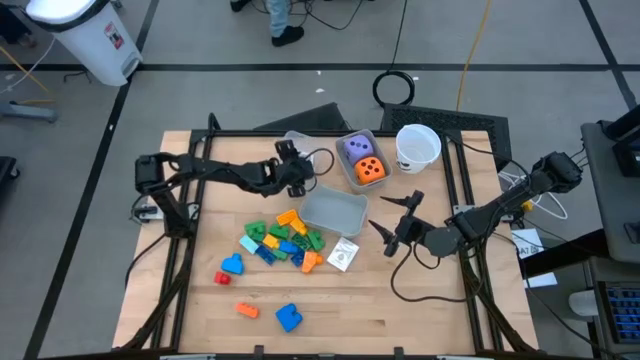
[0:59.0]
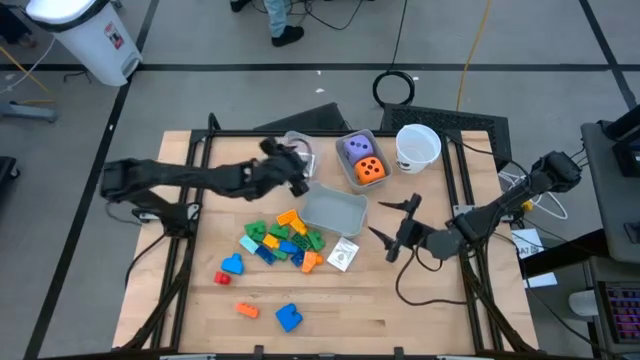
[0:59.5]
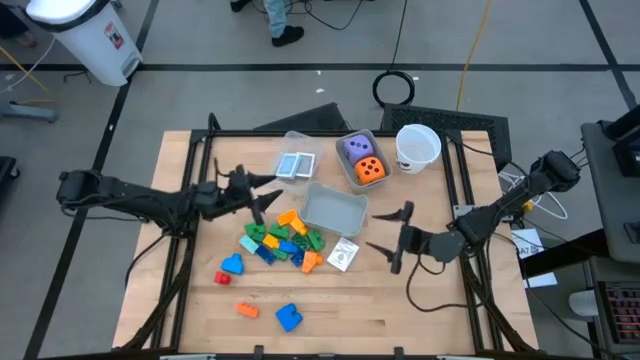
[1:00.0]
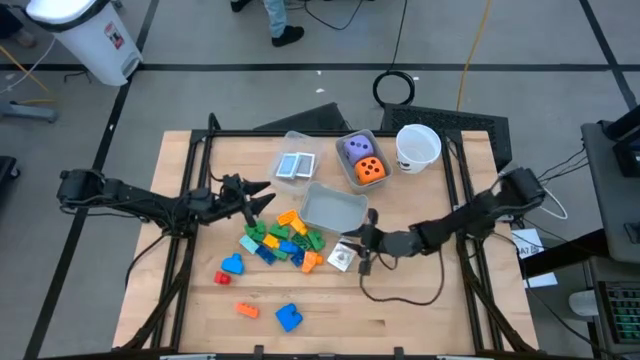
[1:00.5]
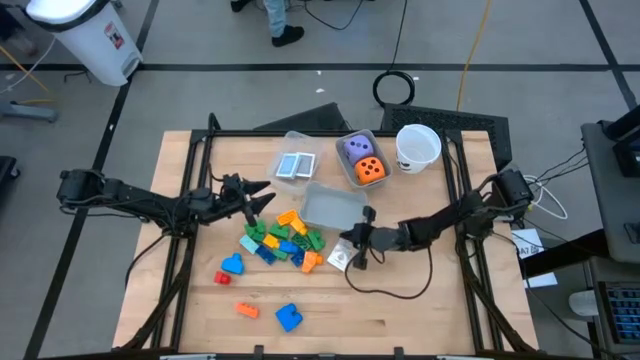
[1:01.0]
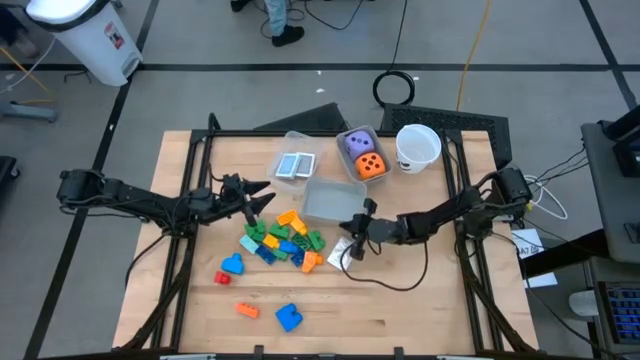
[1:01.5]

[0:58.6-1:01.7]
Task: Pick & Place Toys
Adjust the bottom gray bin on the table

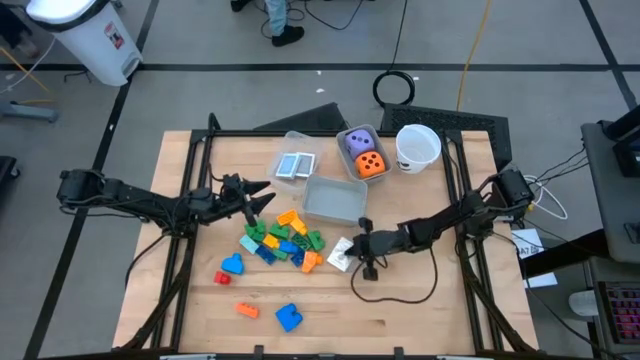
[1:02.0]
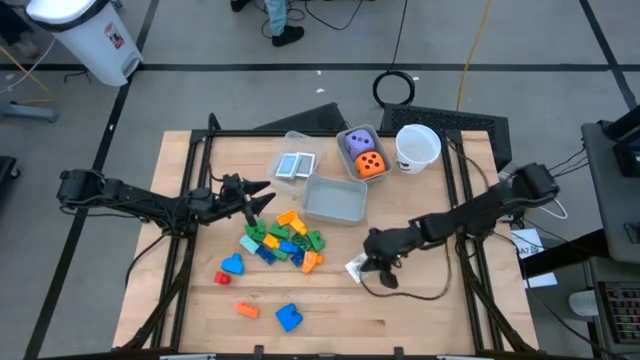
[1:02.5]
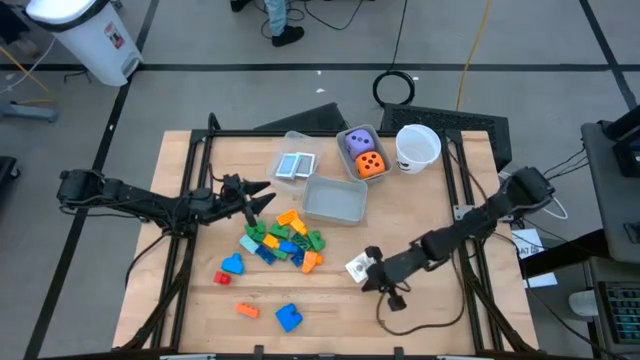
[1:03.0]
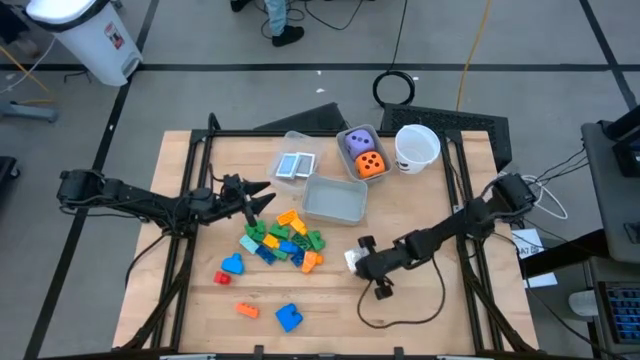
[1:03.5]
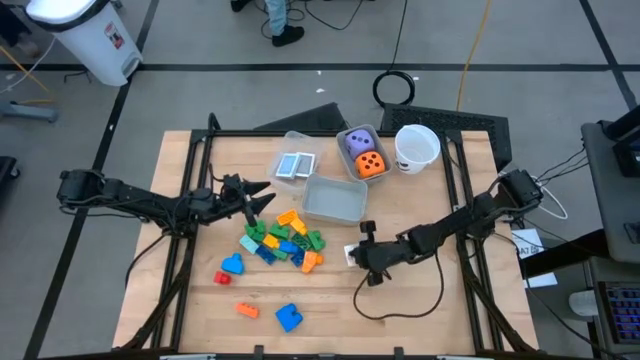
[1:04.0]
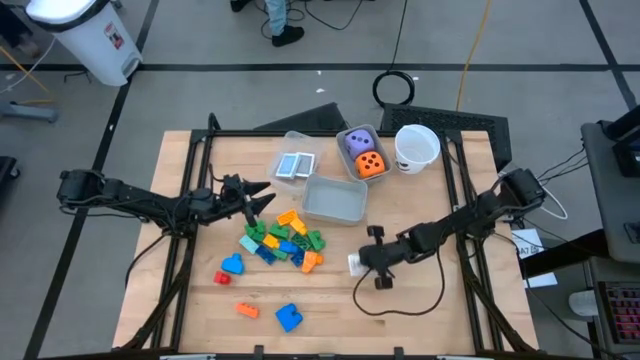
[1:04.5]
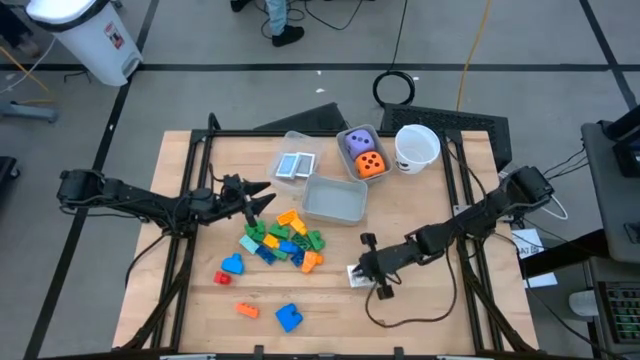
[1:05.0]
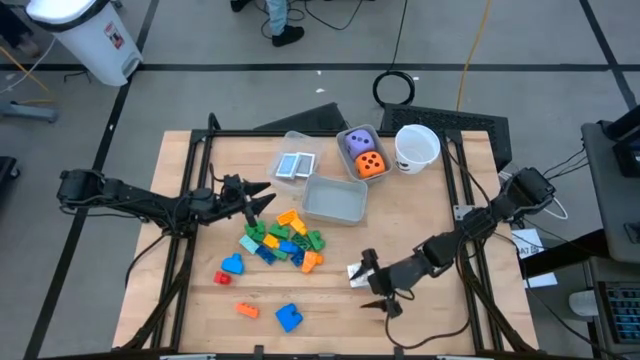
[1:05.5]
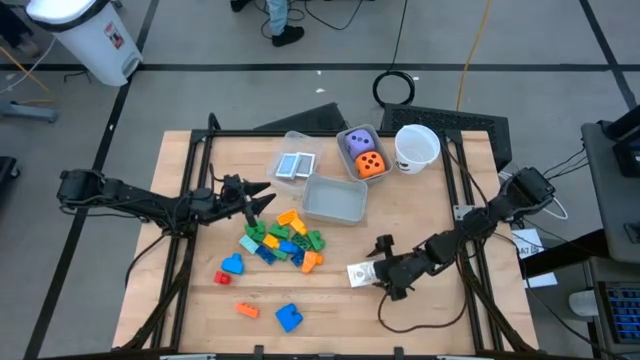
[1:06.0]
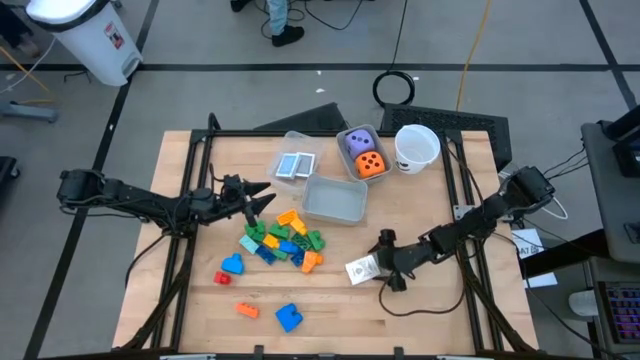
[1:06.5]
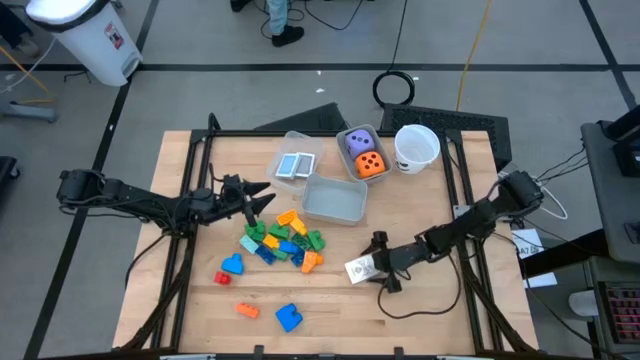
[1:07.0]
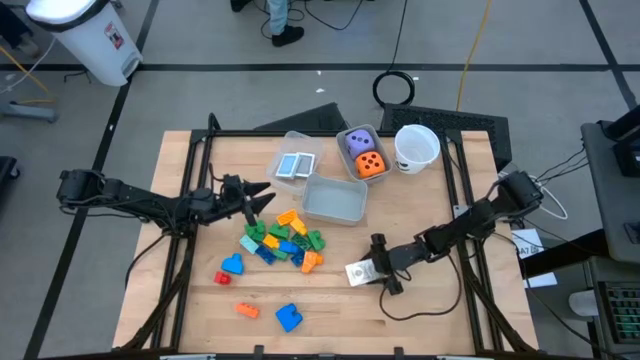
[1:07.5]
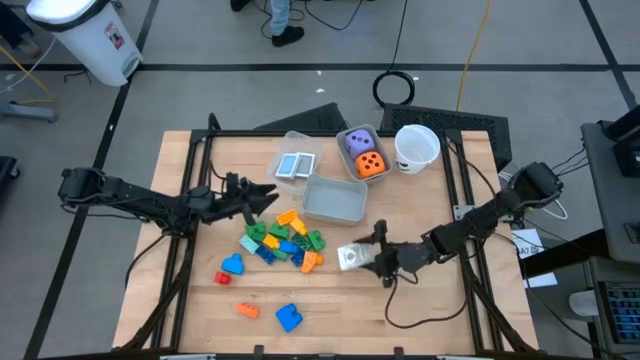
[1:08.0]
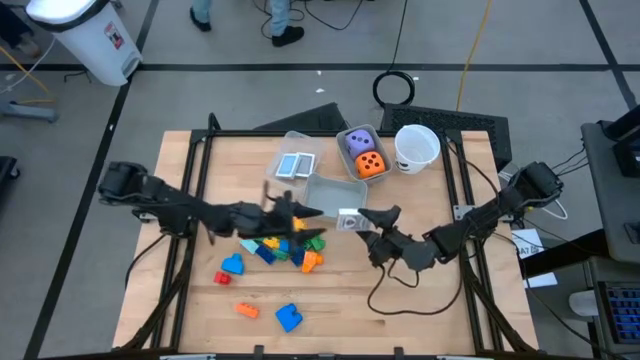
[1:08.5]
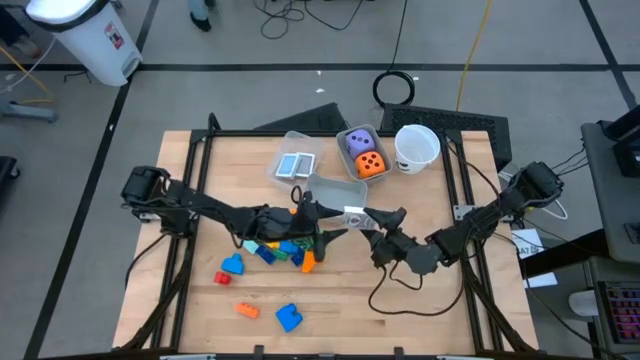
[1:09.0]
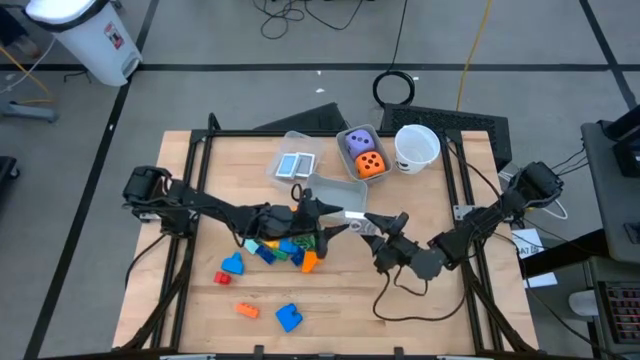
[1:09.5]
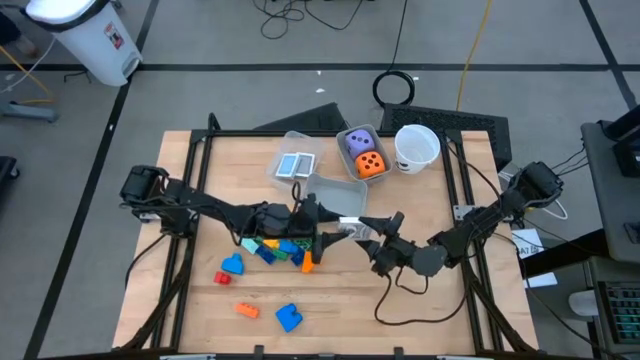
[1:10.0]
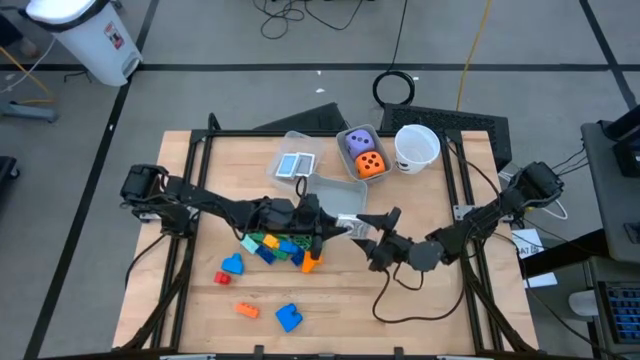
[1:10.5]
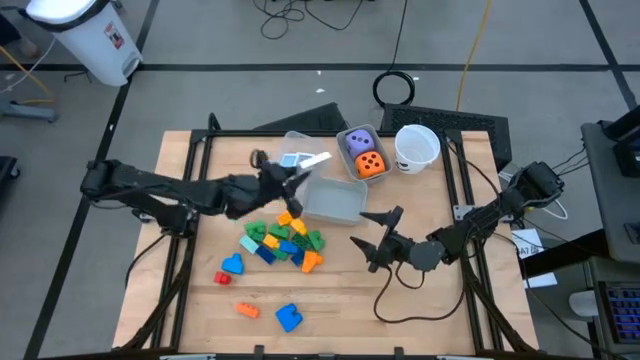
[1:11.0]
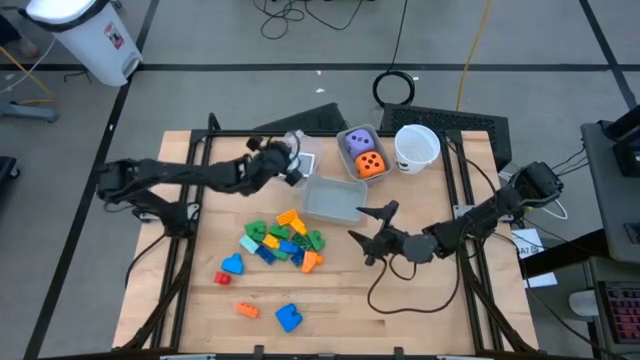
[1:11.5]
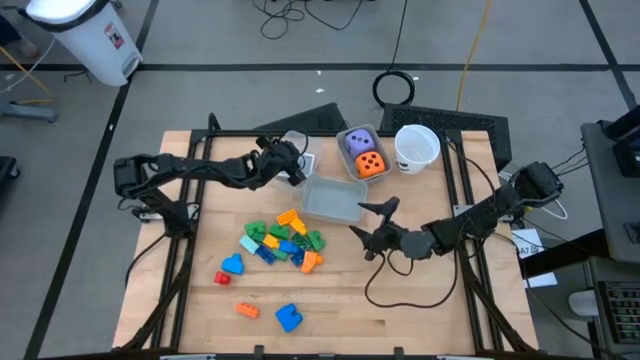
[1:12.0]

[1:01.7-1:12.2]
Put the brown playing card box into the transparent bin

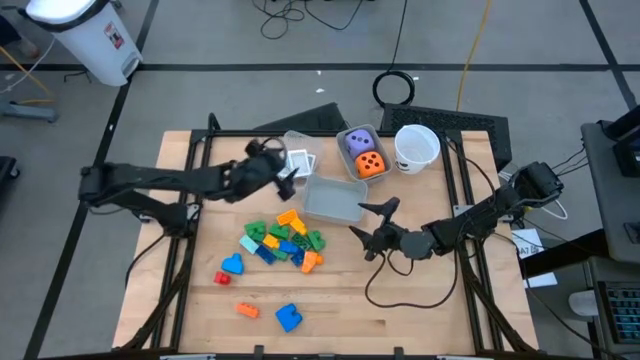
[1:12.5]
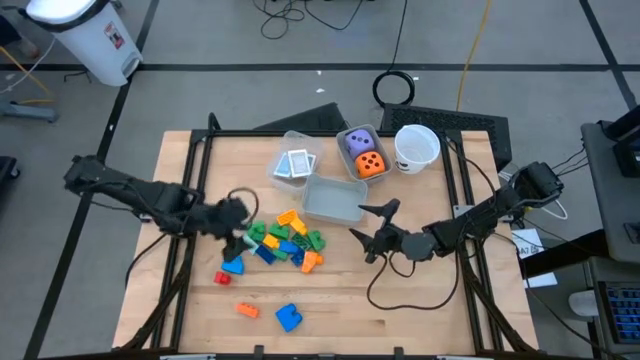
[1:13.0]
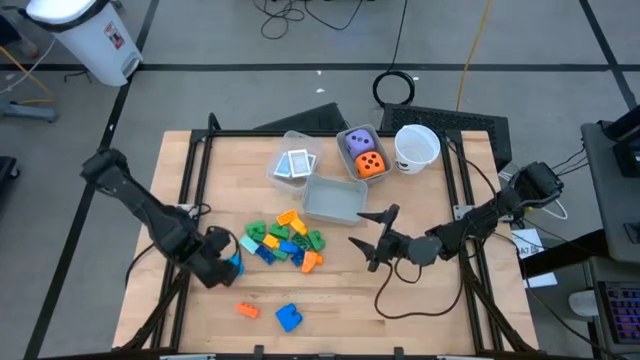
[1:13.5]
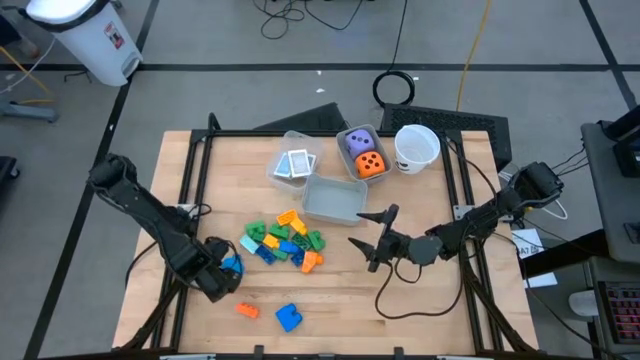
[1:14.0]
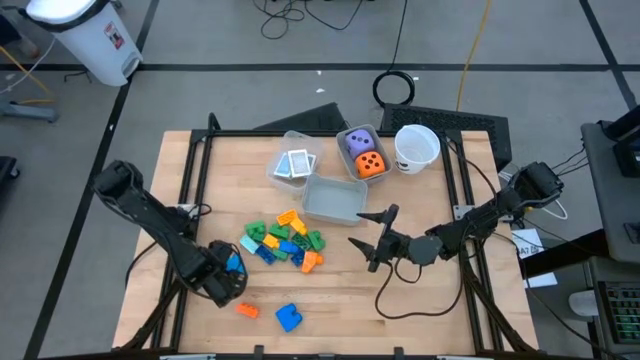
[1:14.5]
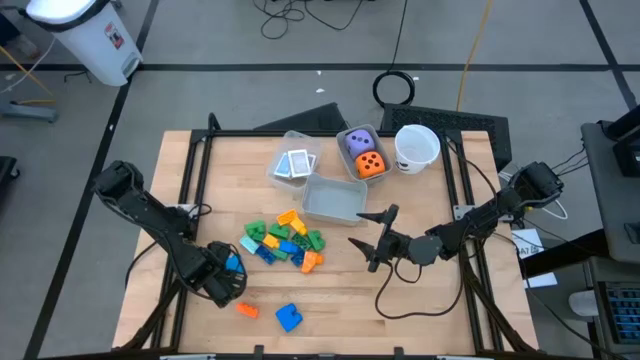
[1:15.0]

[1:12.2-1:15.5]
Put the red game piece into the bottom gray bin

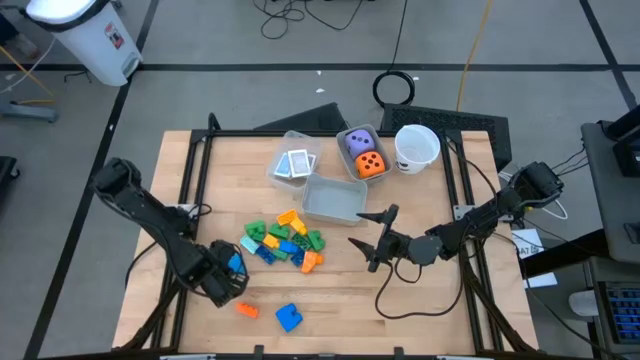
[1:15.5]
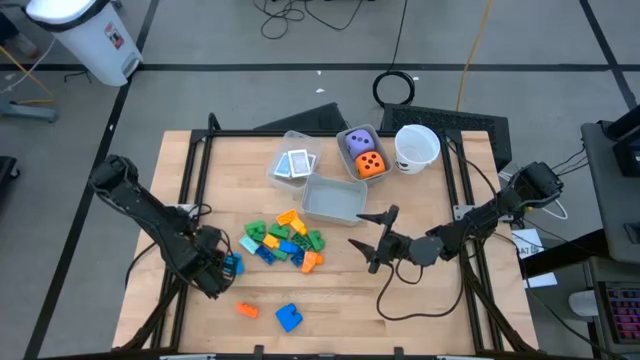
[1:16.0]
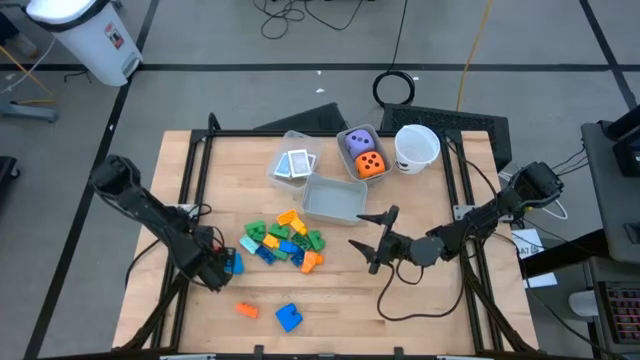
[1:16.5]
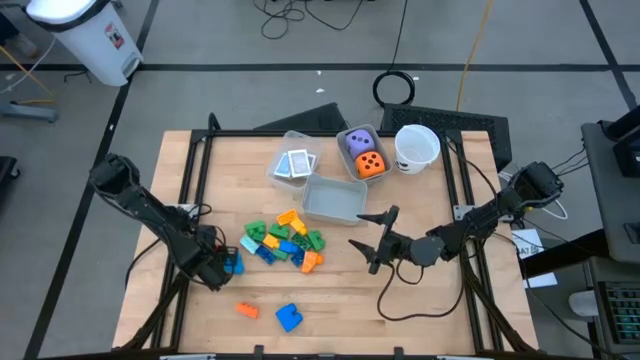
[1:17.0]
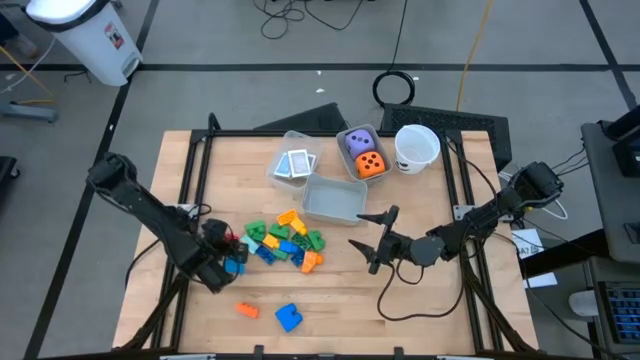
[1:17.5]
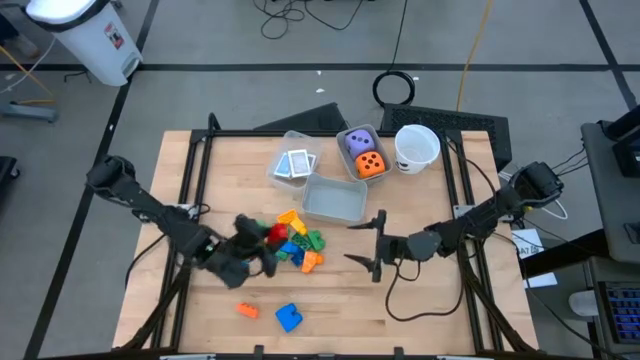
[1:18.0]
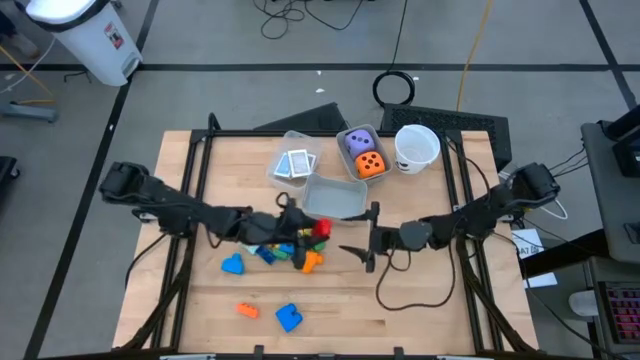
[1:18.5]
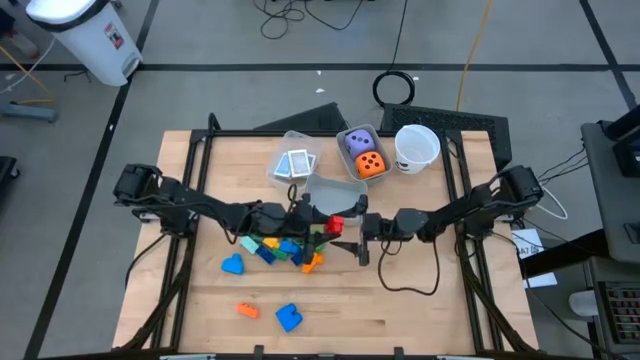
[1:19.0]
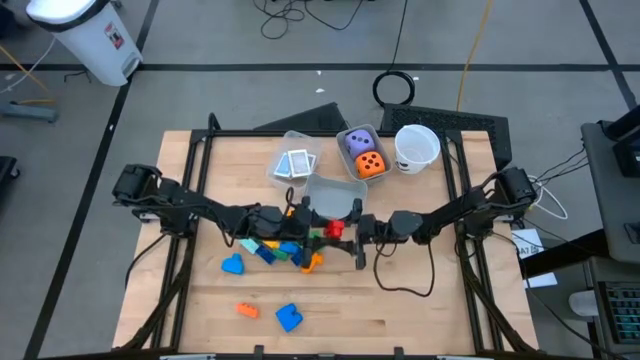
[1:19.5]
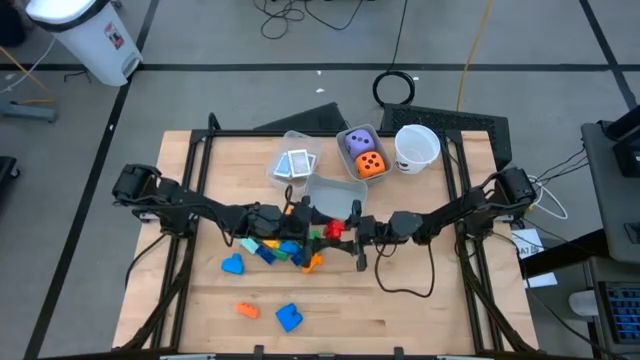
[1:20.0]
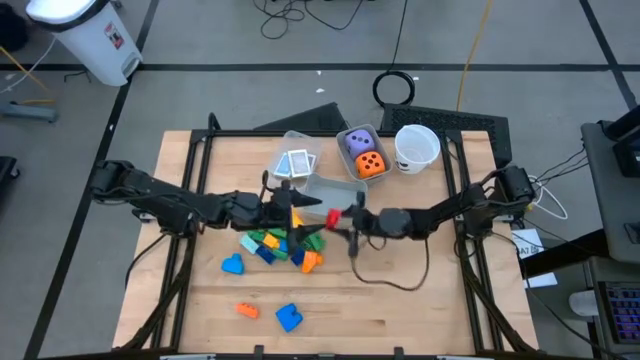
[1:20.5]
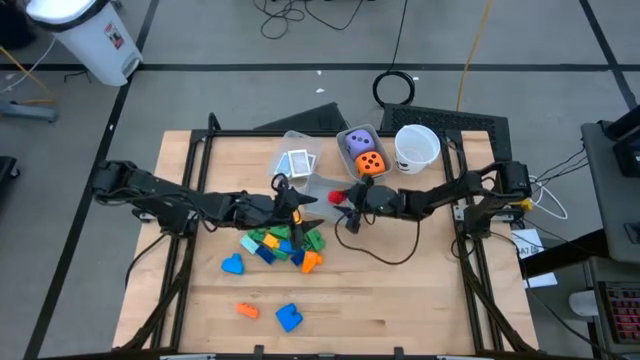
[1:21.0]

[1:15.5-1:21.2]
Put the red game piece into the bottom gray bin
